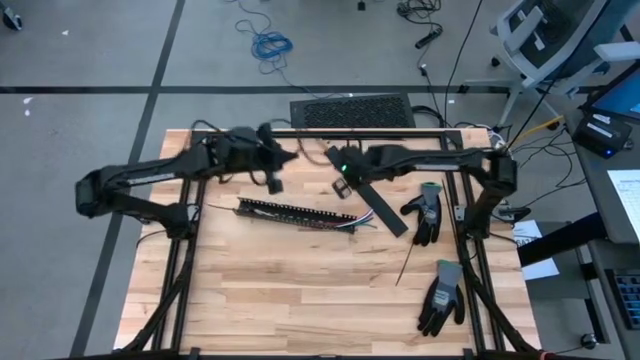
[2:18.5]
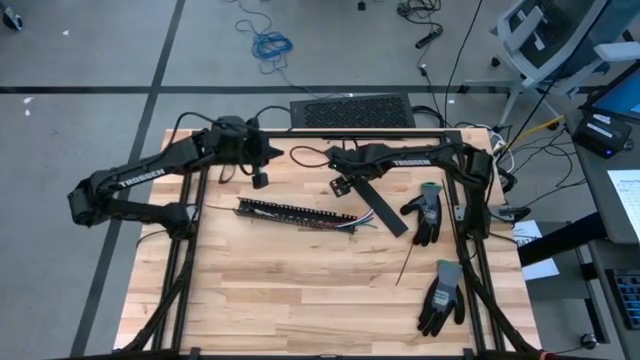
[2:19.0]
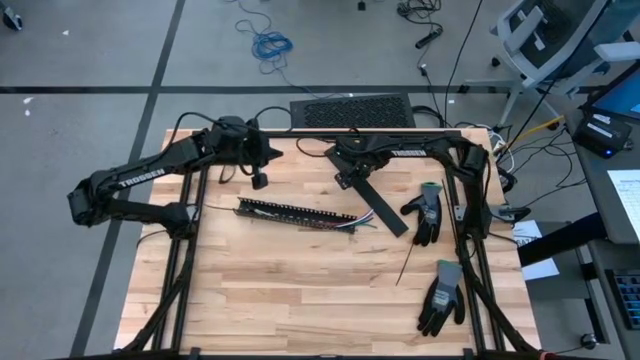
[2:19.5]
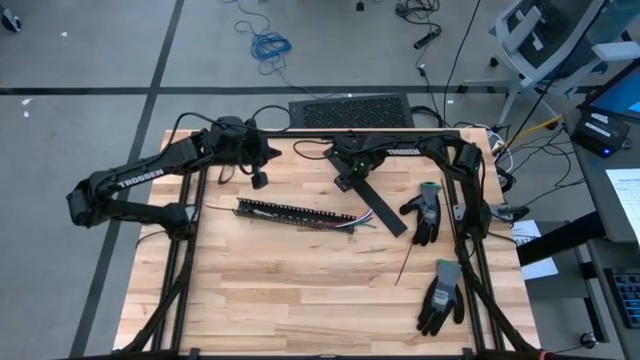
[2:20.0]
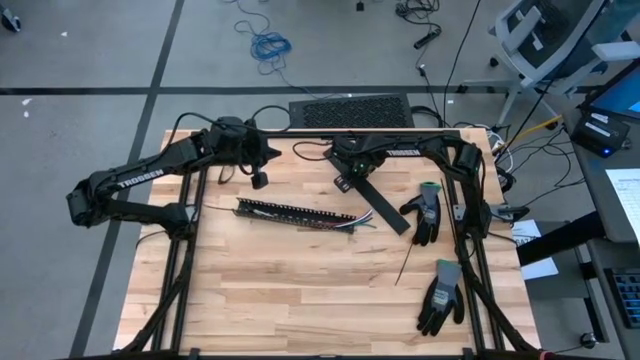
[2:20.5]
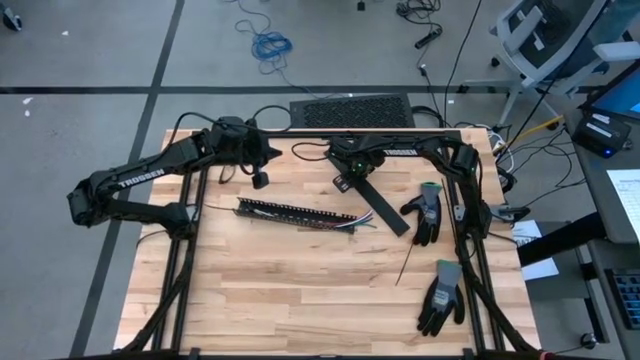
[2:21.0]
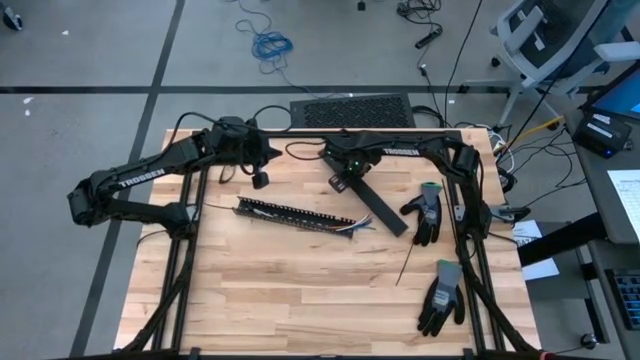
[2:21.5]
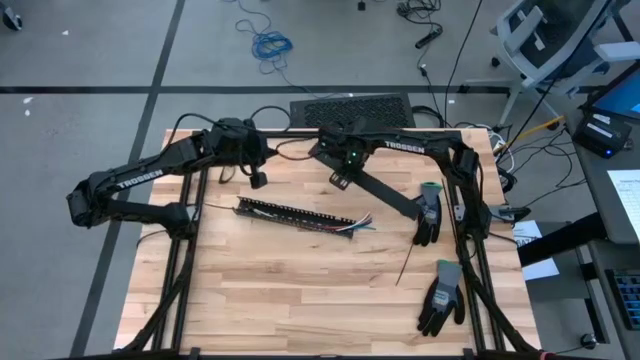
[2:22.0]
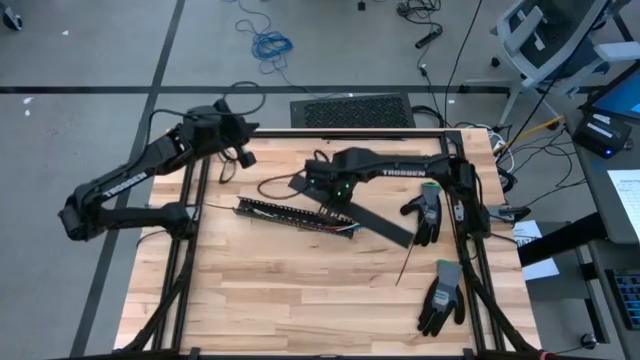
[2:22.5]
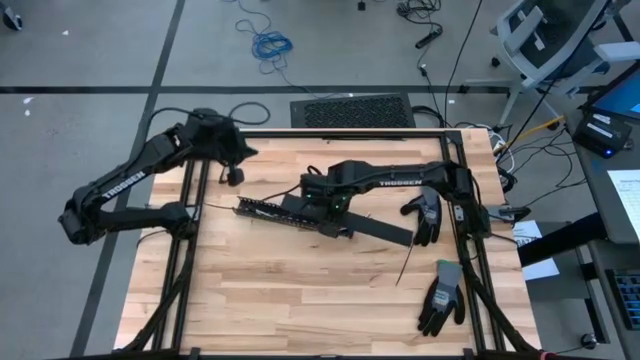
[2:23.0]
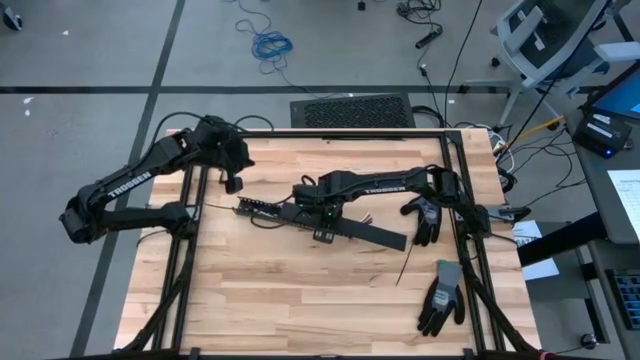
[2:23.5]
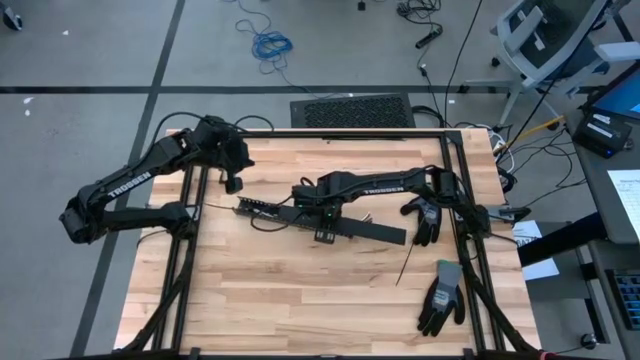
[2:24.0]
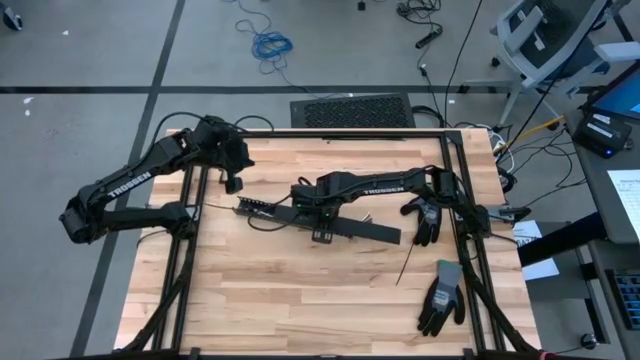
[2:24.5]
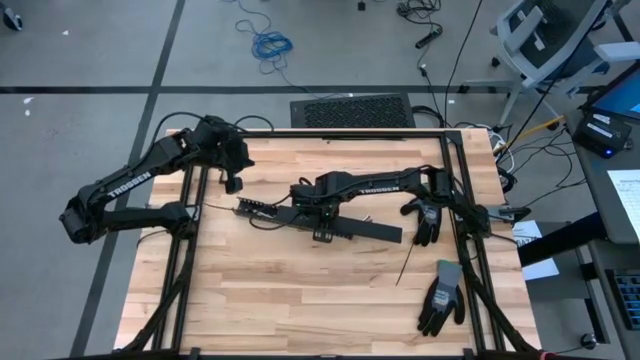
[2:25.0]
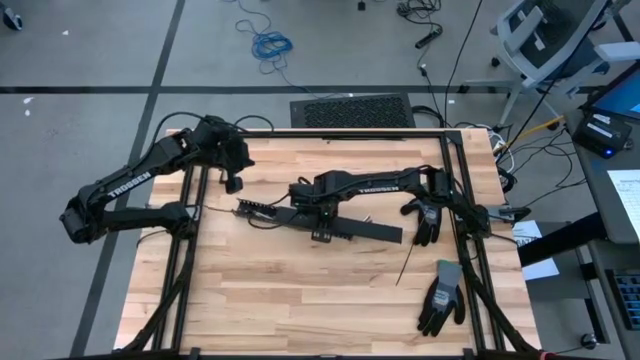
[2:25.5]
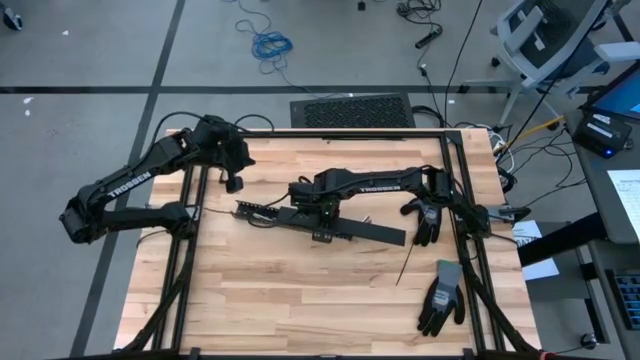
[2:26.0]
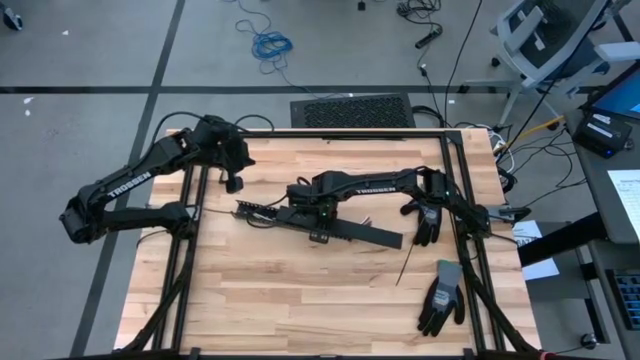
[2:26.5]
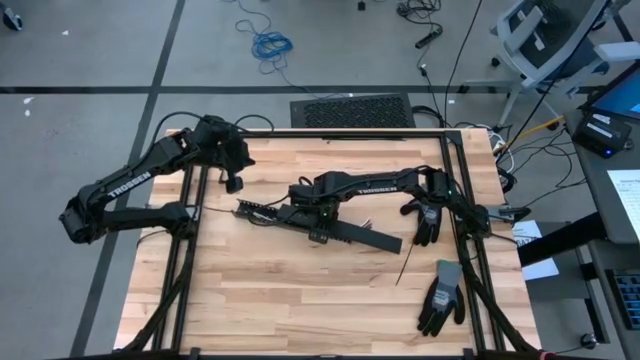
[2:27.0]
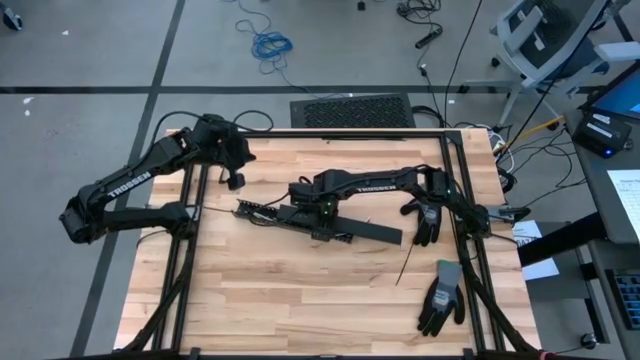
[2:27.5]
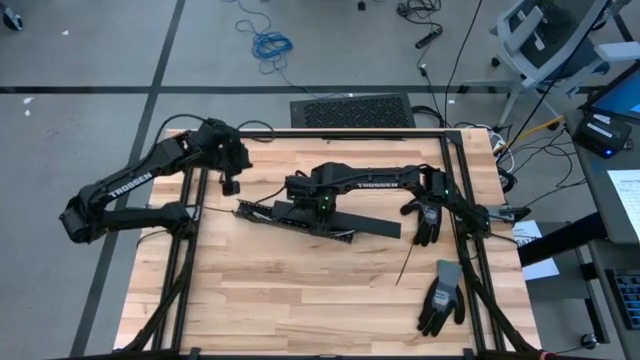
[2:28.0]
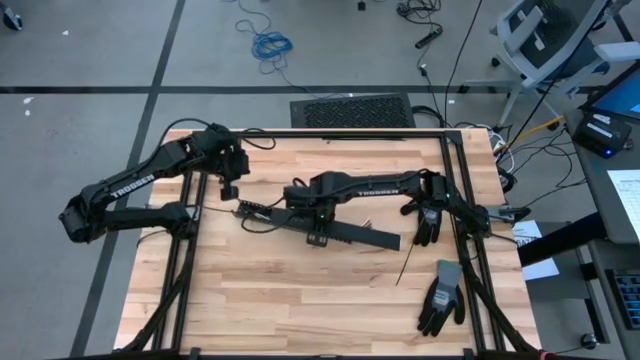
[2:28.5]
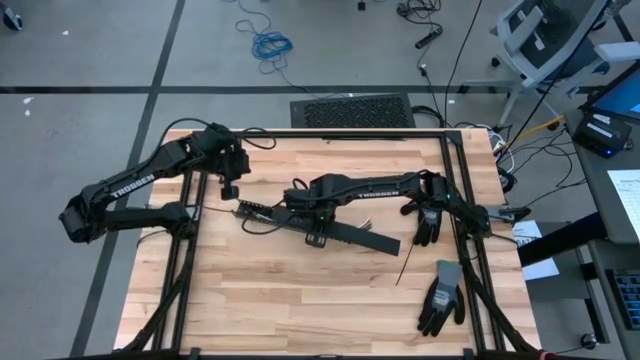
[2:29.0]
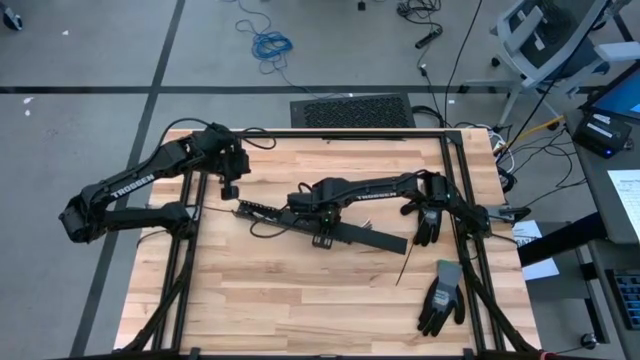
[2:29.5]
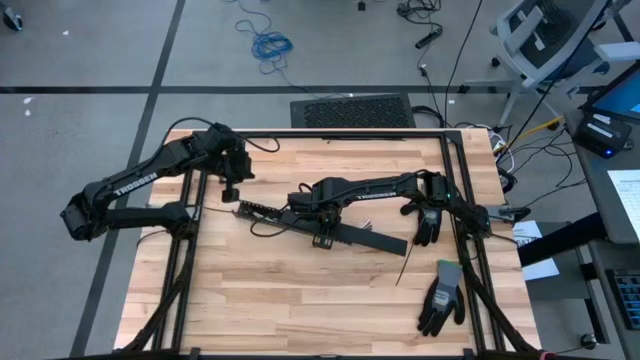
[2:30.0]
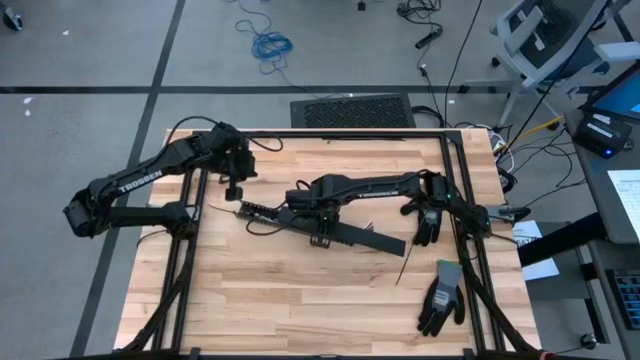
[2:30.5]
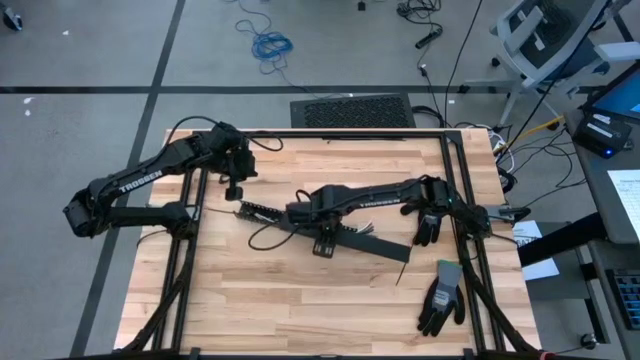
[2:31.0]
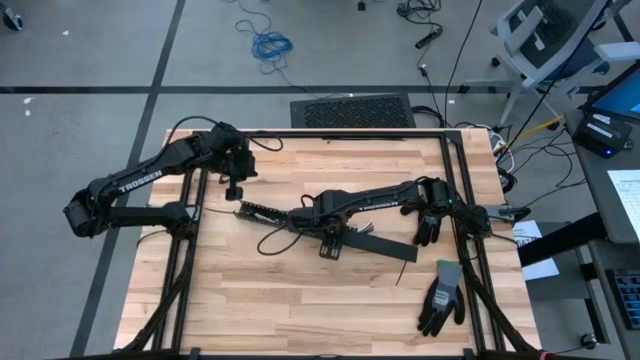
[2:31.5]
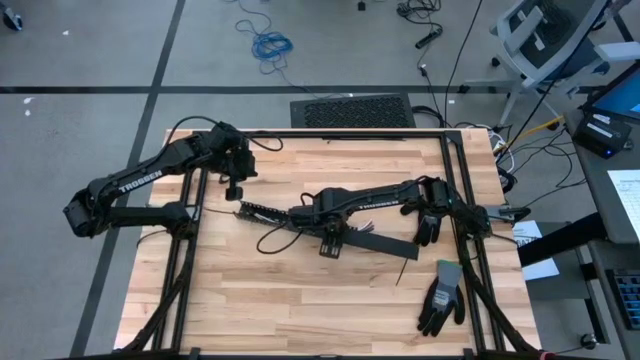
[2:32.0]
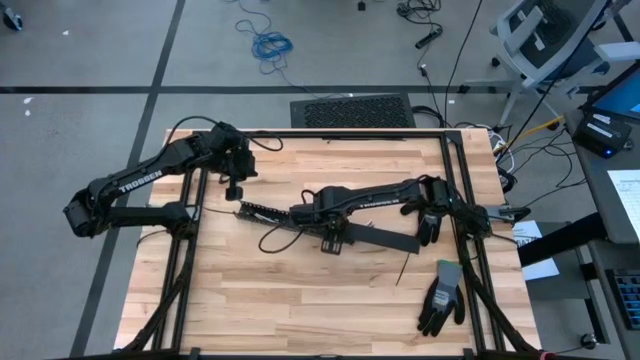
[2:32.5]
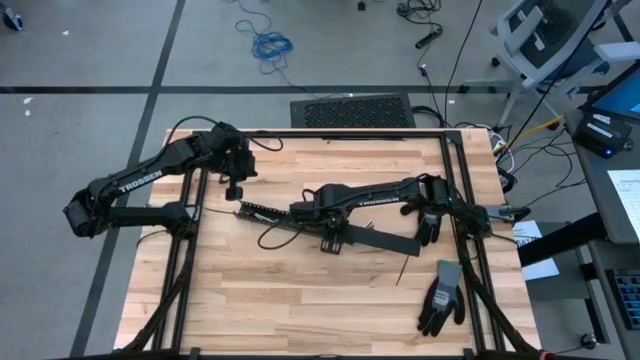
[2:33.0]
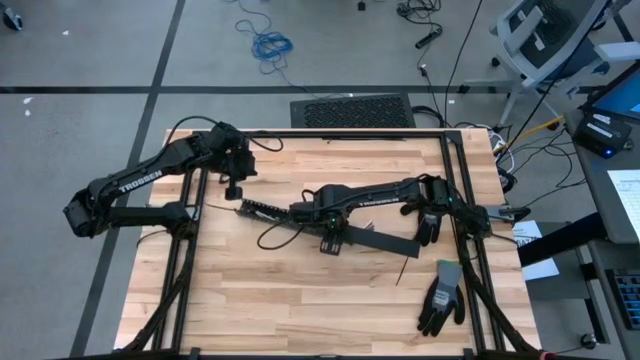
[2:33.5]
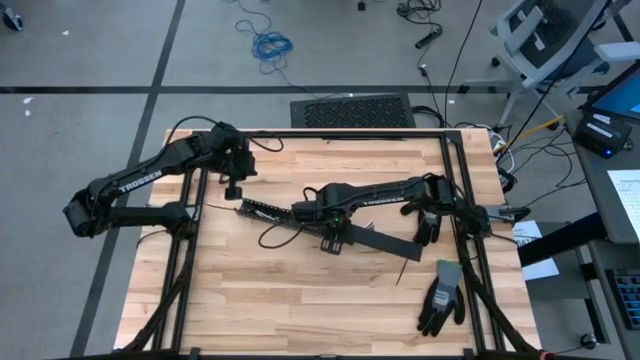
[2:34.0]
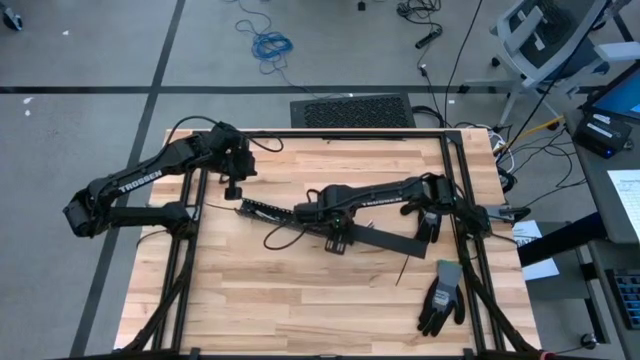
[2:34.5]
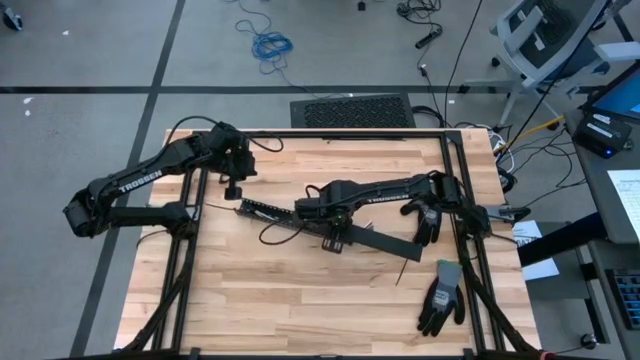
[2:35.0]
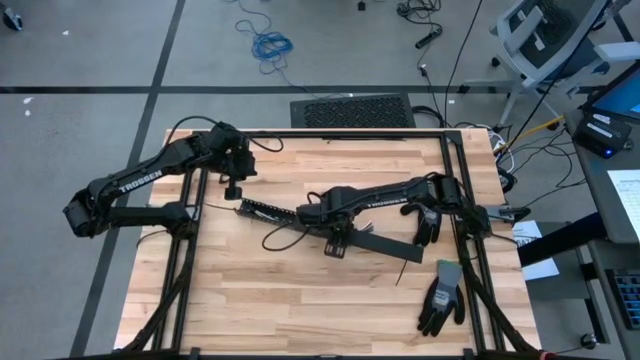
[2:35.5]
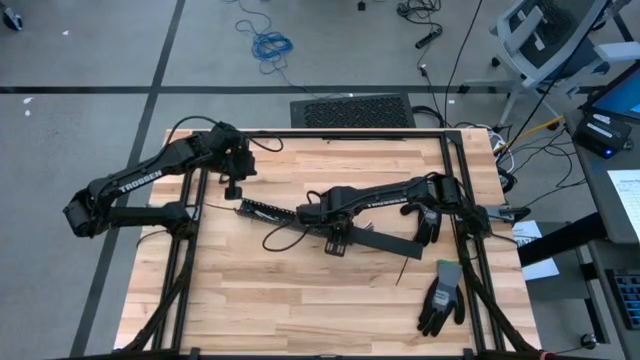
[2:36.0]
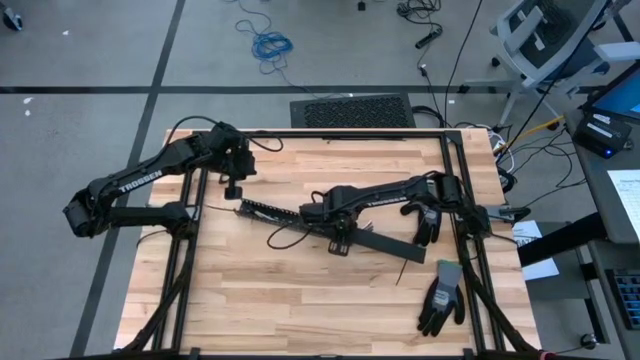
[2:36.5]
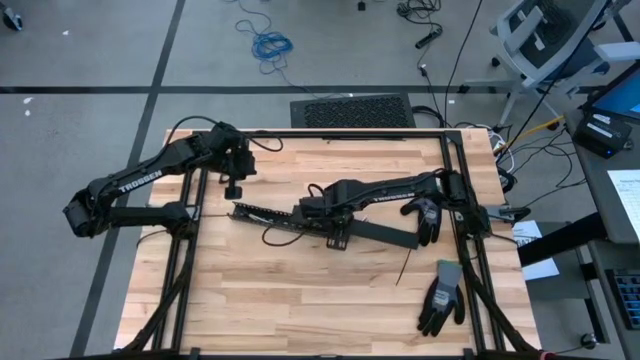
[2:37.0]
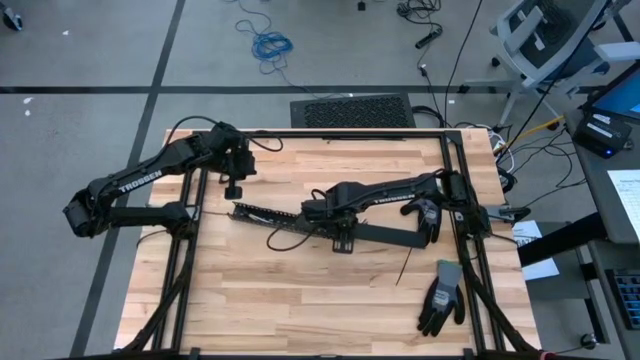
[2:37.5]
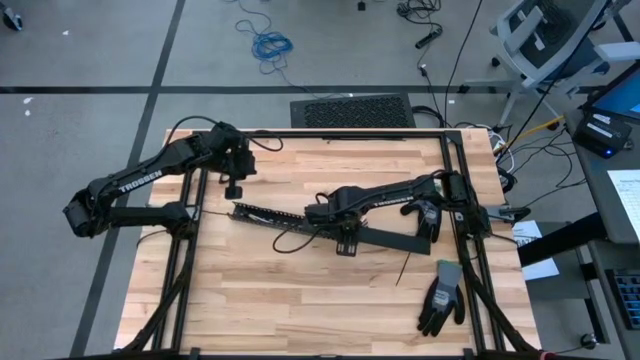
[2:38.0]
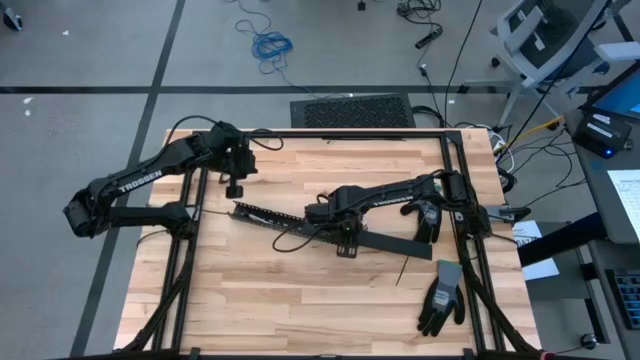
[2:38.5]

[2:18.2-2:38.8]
Task: Ziptie cables
Close the black cable duct cover

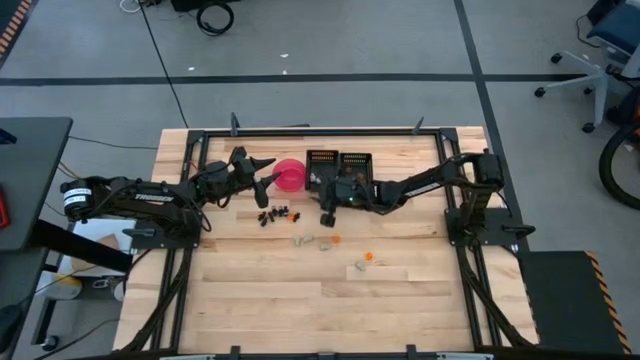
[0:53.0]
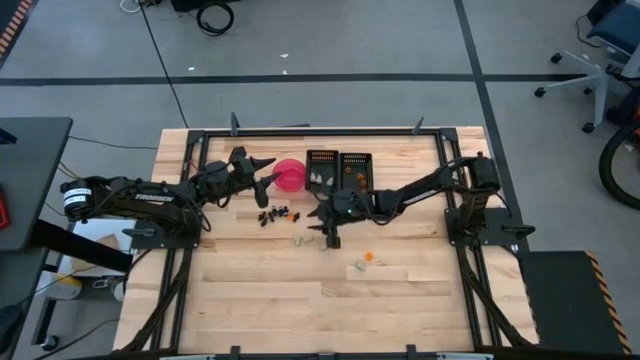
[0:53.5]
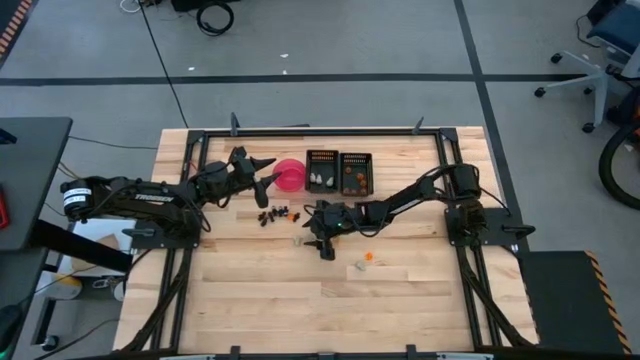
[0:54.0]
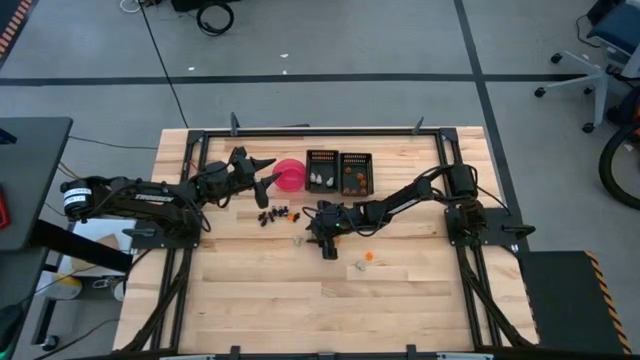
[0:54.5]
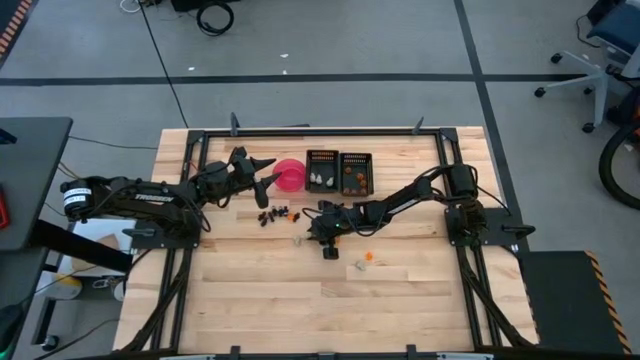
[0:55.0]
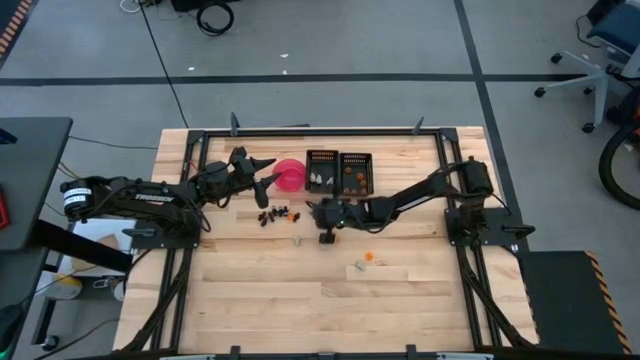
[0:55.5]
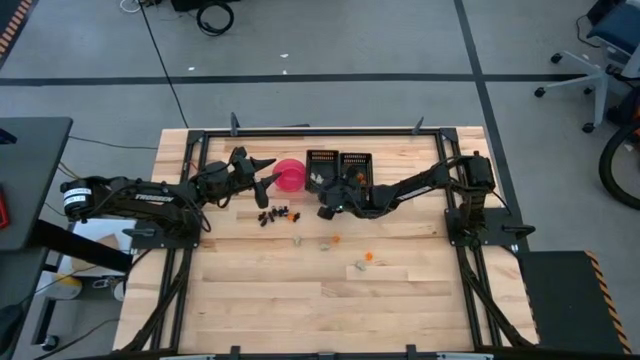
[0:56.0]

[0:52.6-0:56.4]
Task: Sort Halloween decoration
Put the white skull toy into the left black bin
